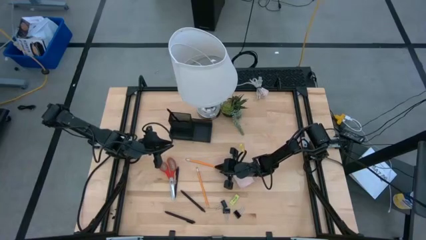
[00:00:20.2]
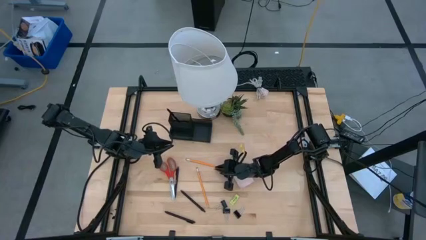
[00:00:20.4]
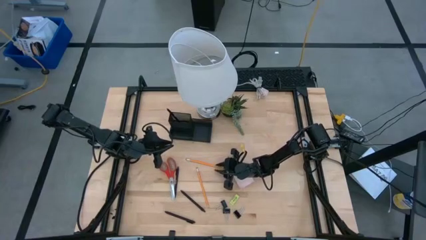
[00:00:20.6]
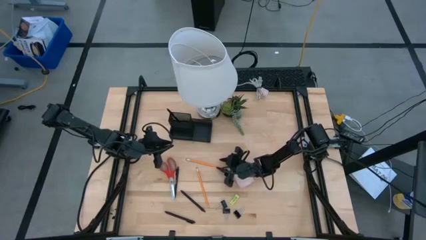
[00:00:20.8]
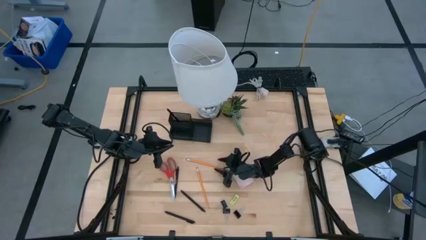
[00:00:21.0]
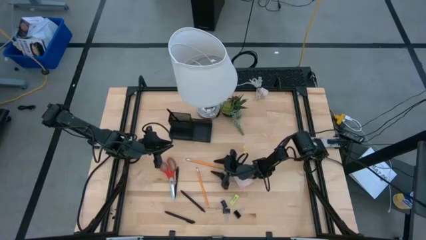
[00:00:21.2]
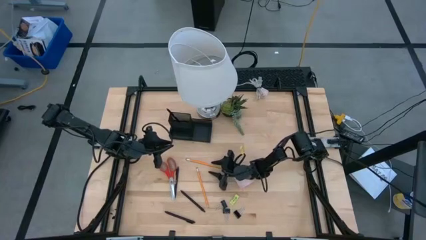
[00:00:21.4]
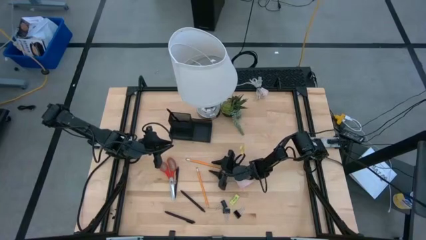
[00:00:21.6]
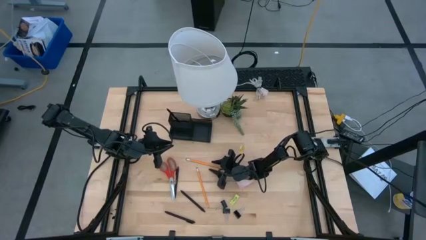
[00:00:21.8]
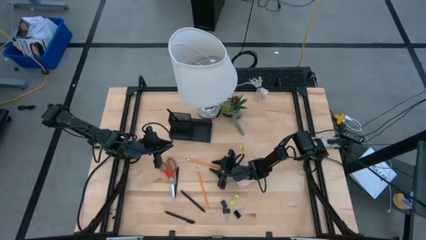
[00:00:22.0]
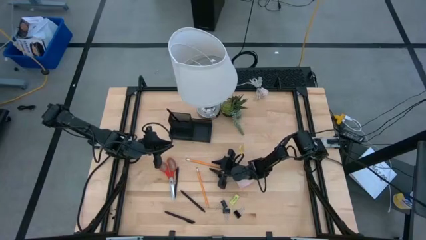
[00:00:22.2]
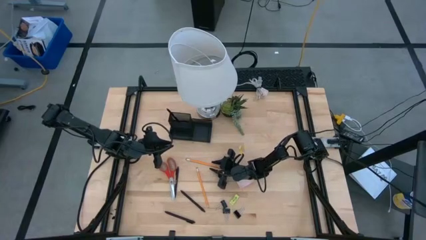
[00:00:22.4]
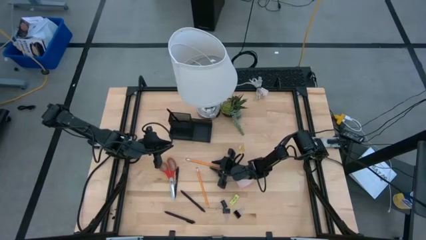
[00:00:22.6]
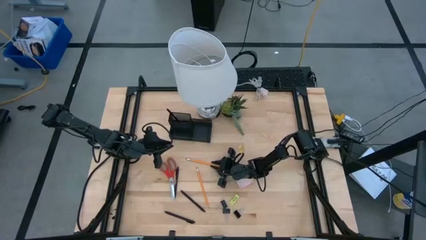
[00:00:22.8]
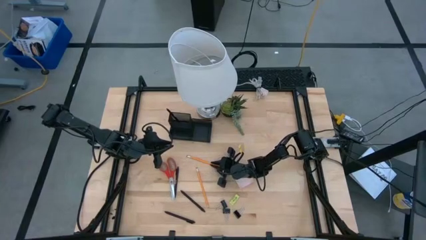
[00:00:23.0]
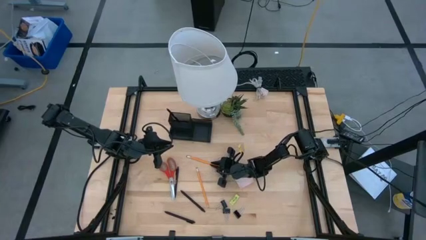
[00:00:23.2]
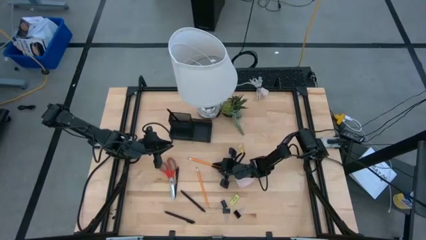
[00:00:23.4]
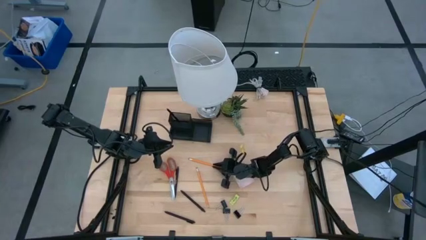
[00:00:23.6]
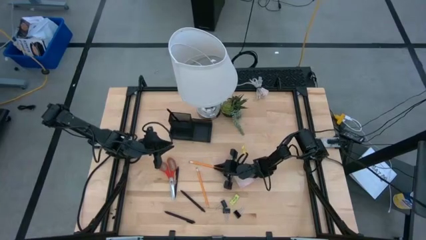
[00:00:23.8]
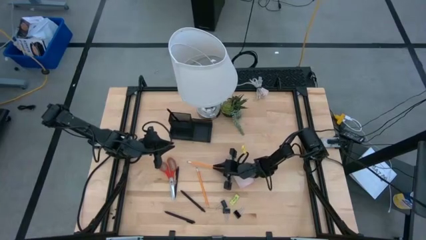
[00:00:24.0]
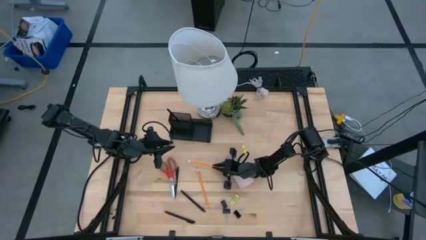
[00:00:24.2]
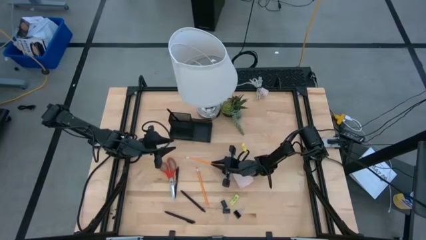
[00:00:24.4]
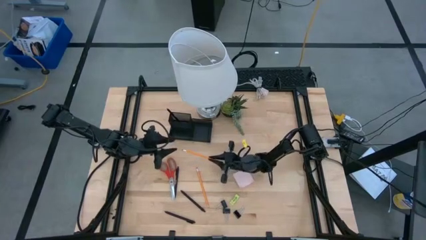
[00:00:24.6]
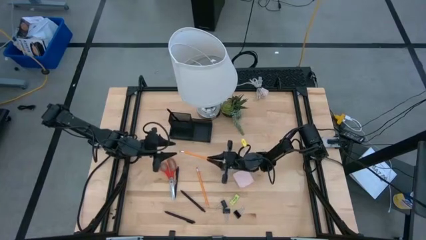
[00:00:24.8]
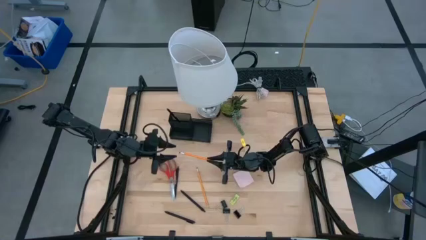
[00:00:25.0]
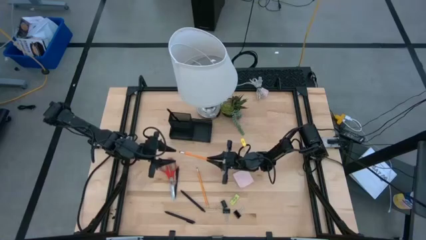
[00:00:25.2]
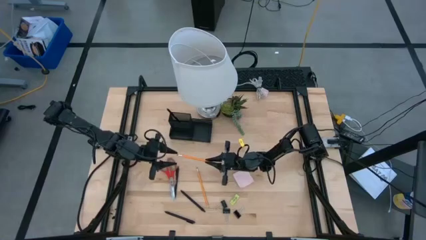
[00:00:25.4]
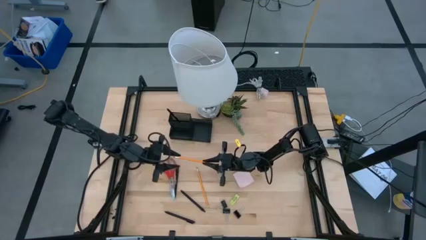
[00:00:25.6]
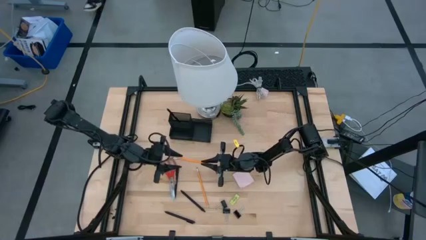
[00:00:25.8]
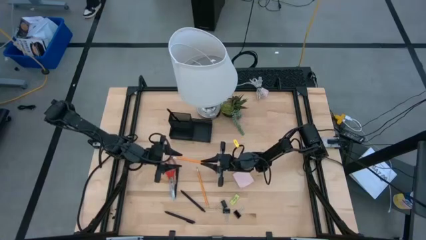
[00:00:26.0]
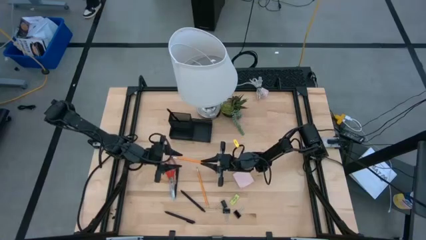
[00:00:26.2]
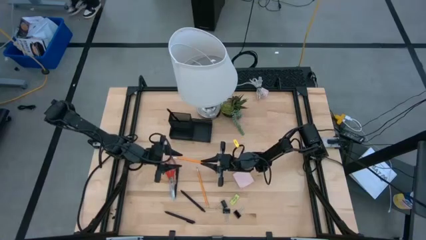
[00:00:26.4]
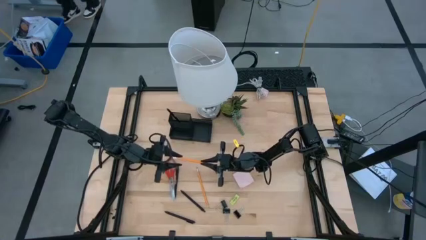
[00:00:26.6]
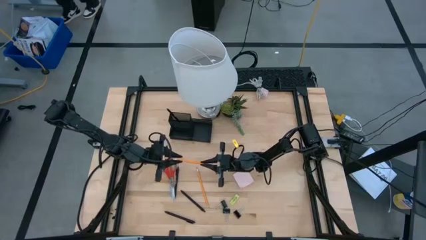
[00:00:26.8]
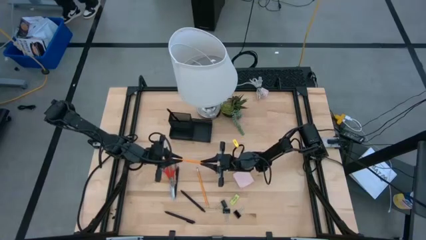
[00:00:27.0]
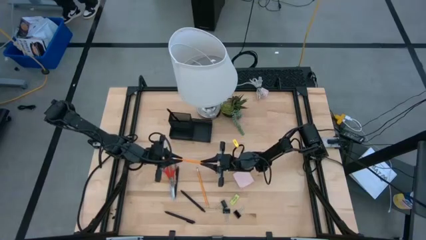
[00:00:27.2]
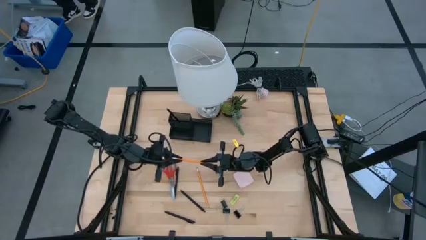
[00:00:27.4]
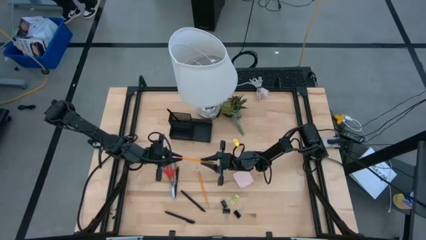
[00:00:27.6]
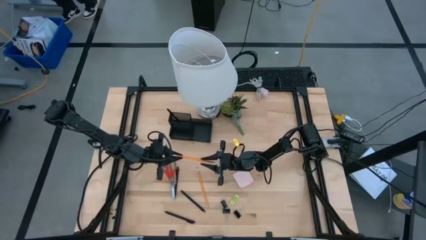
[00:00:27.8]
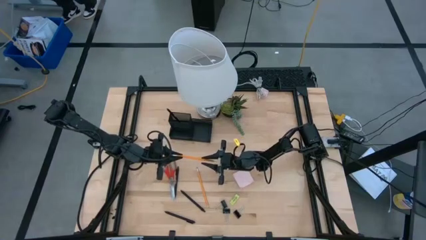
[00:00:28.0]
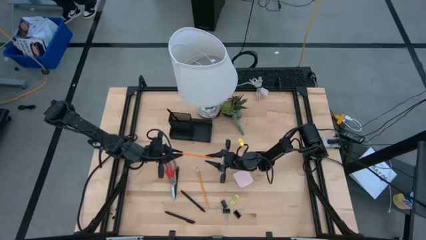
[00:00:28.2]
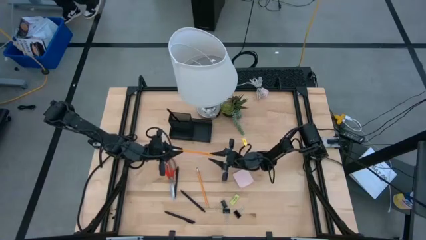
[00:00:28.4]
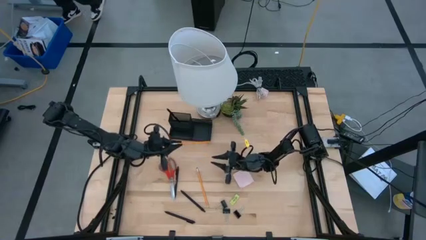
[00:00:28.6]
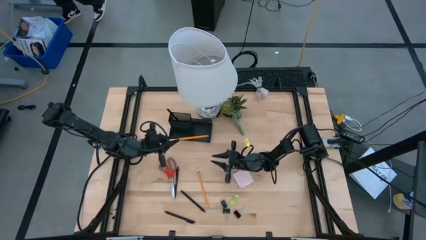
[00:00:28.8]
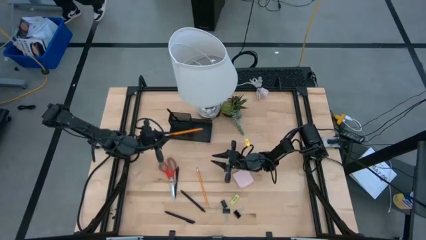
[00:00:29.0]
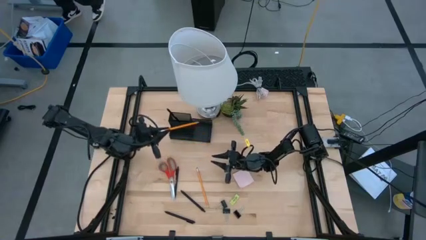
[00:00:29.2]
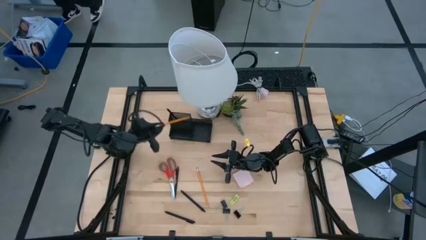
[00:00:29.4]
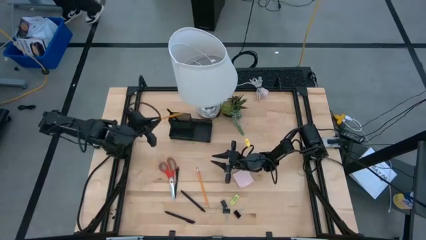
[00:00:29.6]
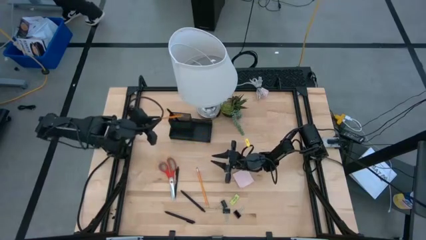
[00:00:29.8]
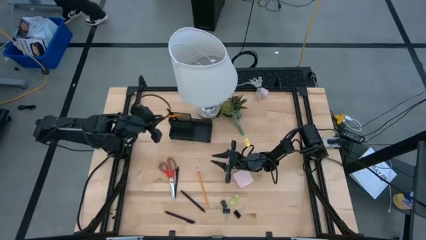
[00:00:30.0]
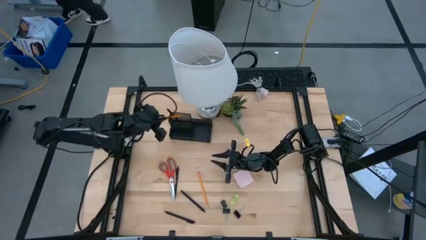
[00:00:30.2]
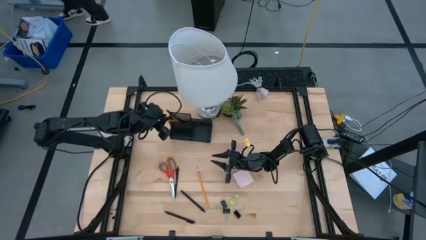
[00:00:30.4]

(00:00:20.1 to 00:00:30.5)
Task: Pick and place office supplies into organizer
Put the orange pencil into the black desk organizer

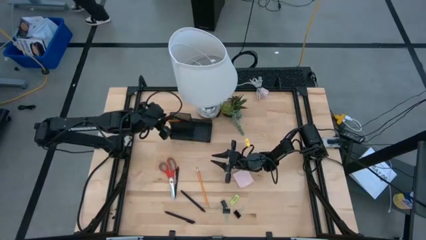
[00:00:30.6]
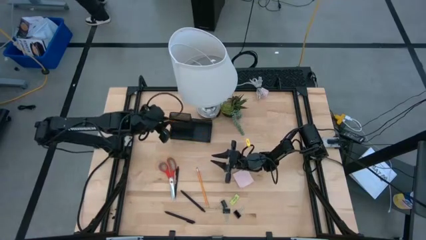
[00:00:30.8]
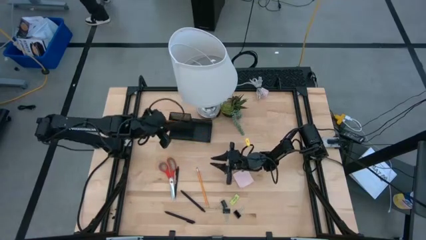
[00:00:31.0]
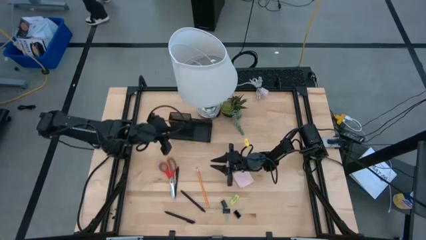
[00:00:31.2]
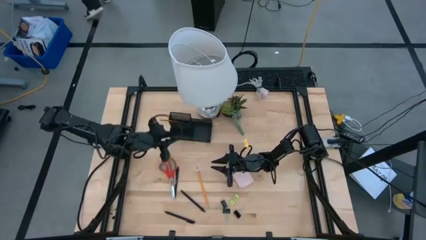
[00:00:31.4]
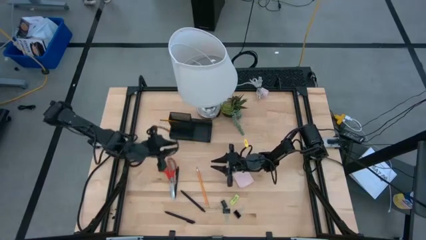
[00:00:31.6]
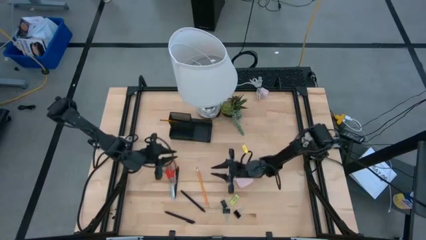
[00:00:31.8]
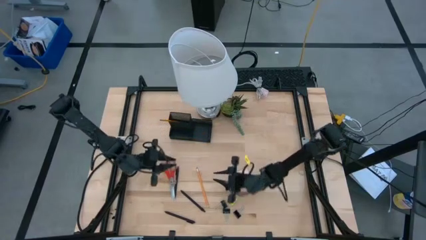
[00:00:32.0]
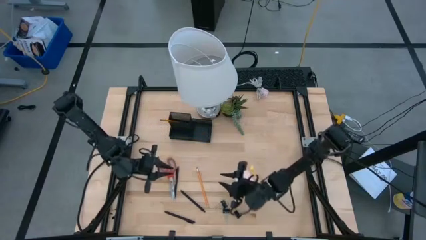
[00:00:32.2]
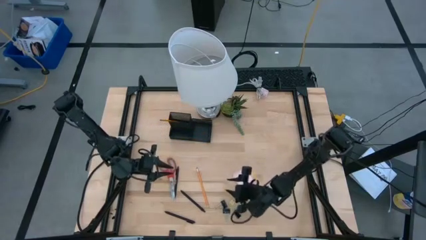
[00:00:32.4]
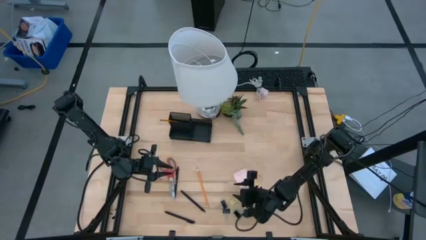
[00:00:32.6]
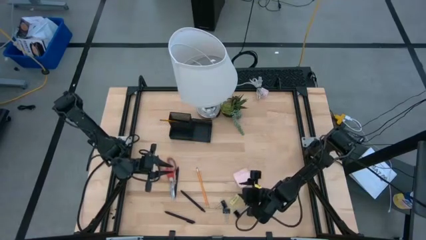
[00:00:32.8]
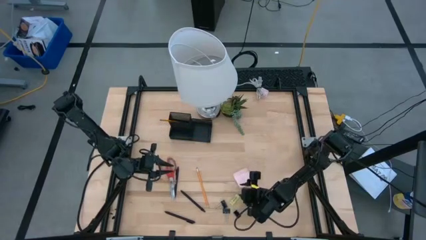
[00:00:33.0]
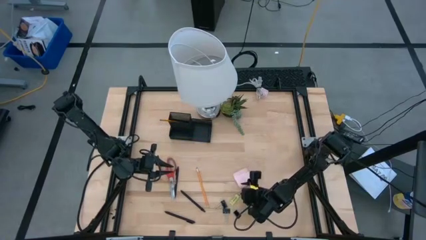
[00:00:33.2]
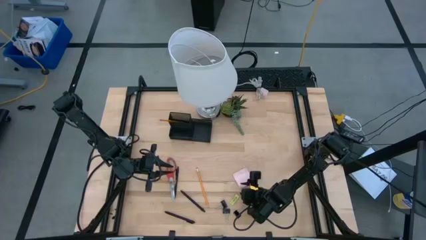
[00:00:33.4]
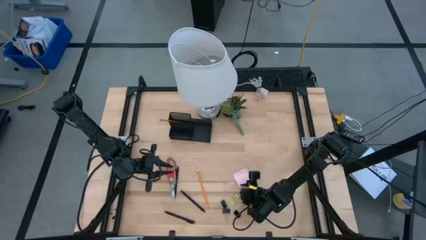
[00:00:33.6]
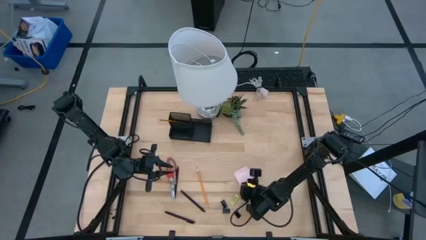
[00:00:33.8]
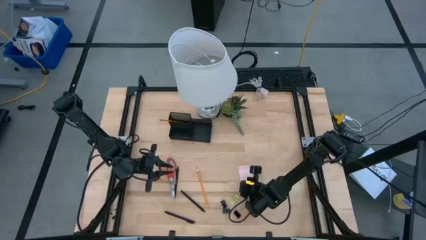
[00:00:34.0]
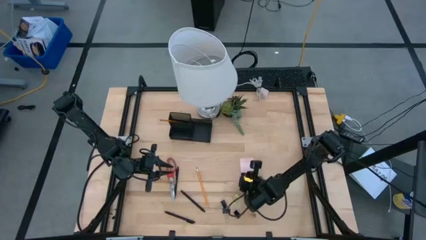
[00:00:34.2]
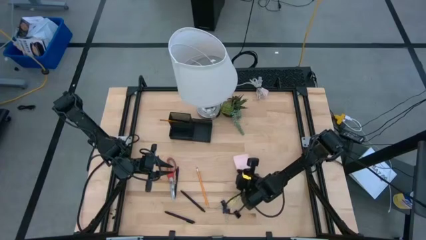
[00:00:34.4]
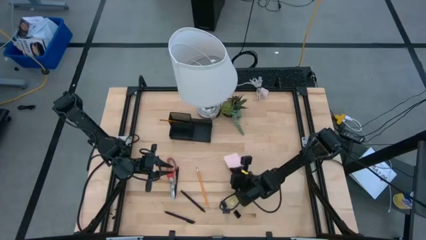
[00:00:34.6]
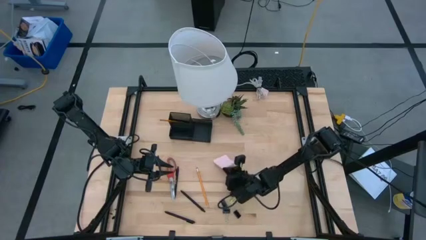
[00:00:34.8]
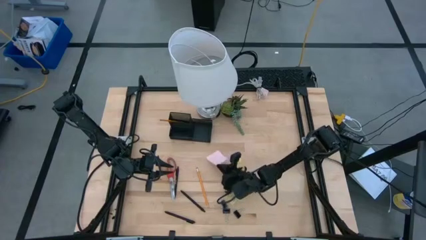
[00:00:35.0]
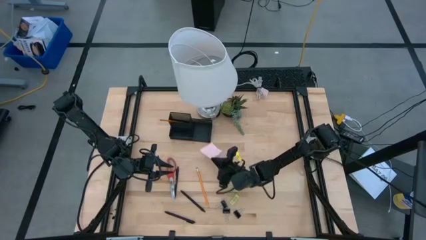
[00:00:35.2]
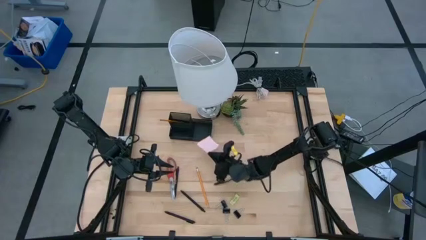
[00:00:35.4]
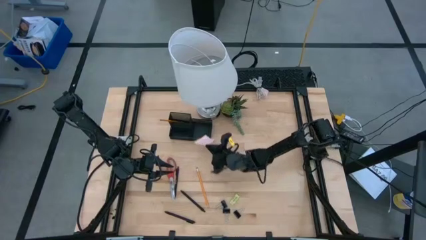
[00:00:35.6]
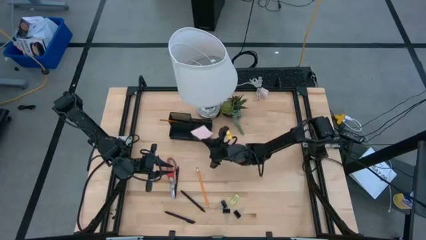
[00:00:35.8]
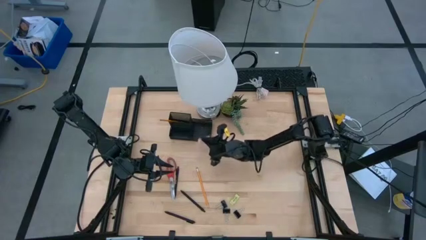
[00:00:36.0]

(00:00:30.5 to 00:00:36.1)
Put the pink sticky note into the black desk organizer
